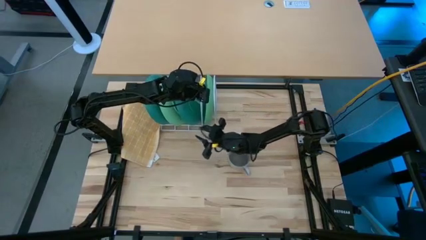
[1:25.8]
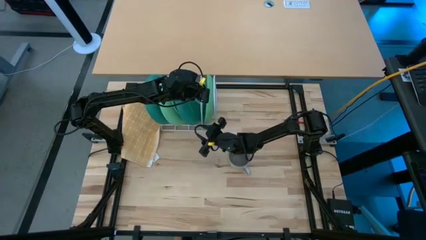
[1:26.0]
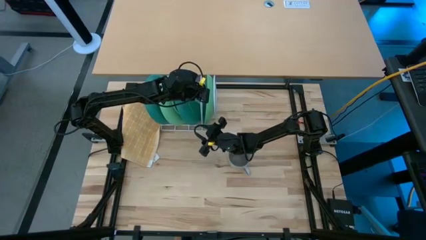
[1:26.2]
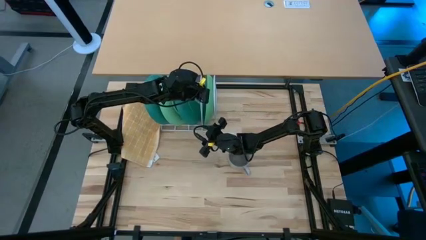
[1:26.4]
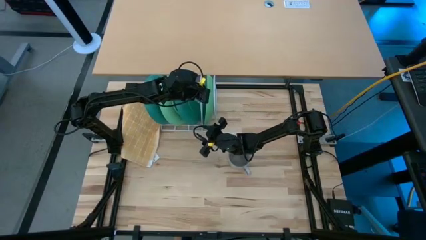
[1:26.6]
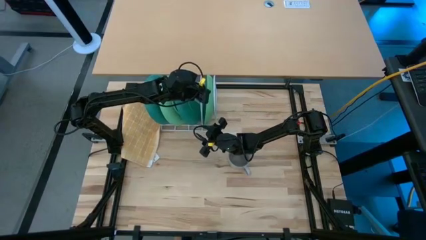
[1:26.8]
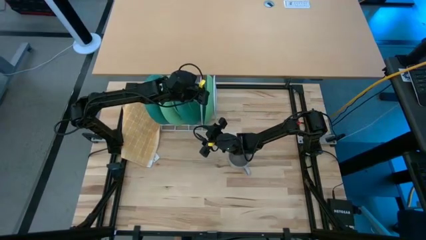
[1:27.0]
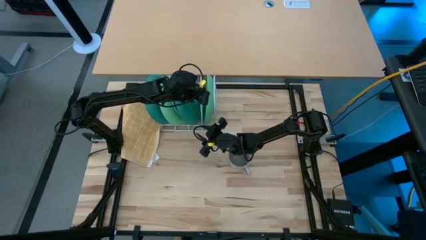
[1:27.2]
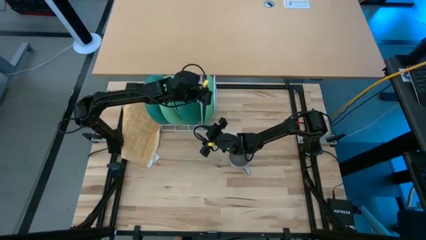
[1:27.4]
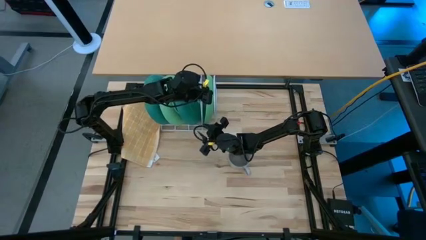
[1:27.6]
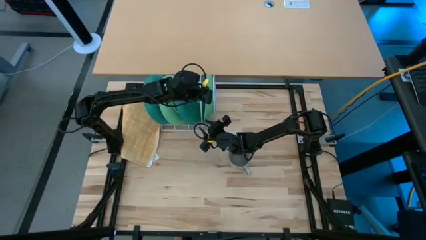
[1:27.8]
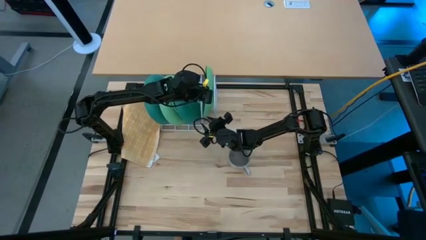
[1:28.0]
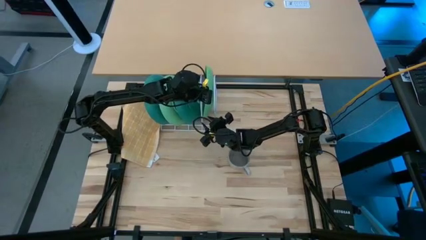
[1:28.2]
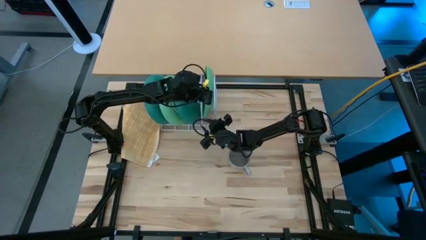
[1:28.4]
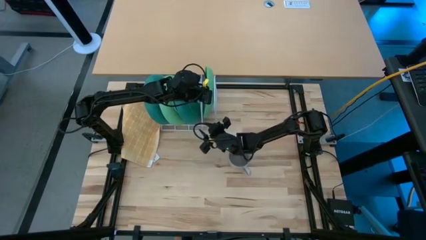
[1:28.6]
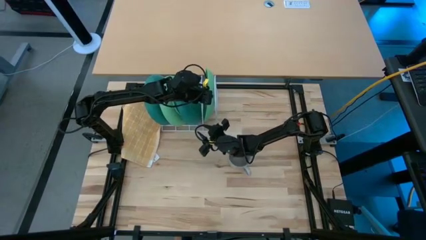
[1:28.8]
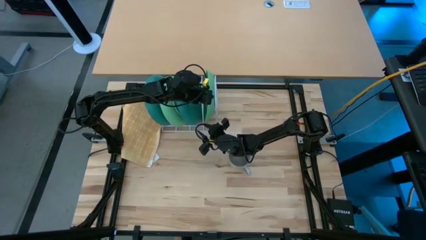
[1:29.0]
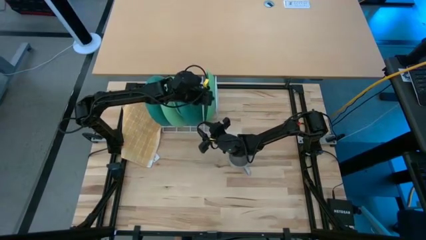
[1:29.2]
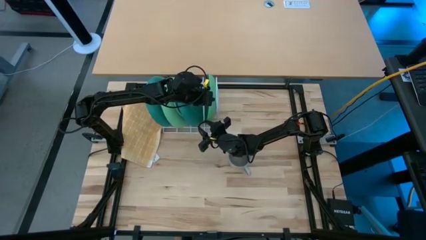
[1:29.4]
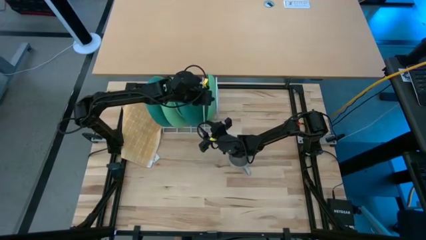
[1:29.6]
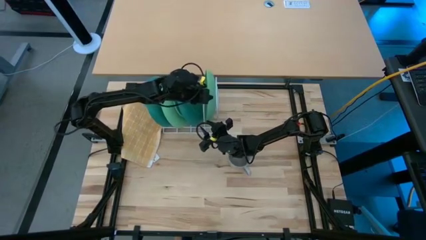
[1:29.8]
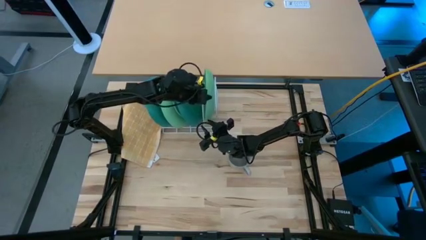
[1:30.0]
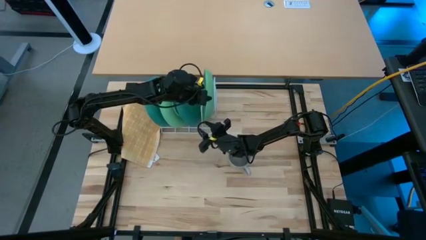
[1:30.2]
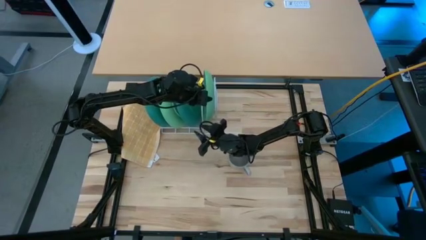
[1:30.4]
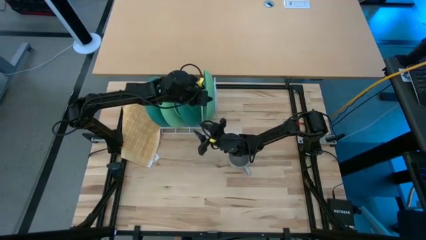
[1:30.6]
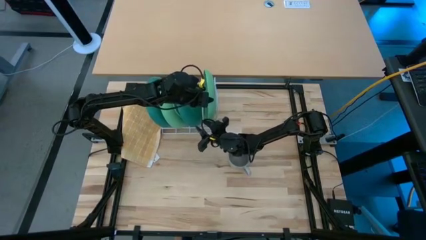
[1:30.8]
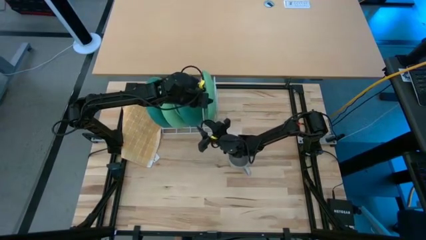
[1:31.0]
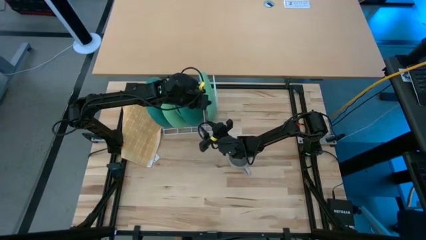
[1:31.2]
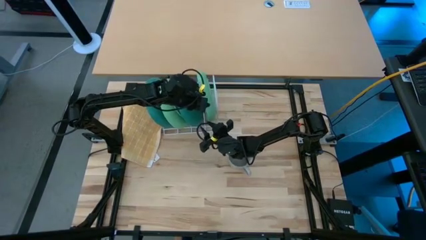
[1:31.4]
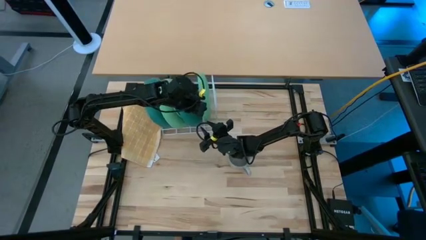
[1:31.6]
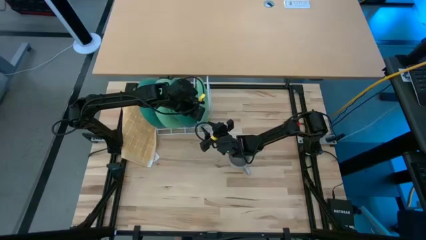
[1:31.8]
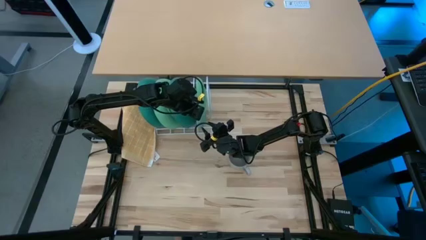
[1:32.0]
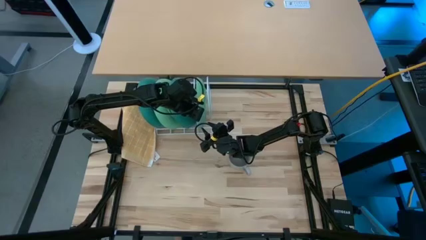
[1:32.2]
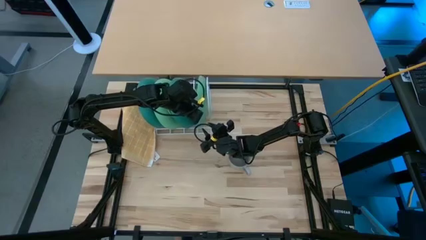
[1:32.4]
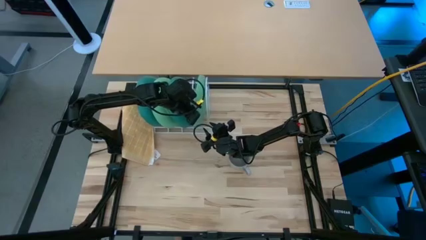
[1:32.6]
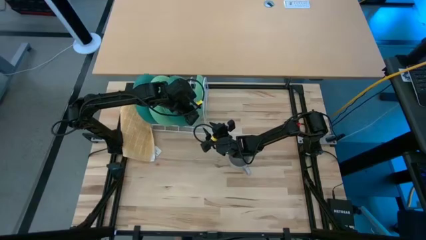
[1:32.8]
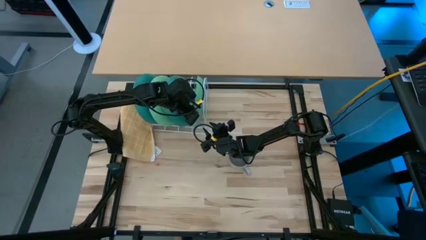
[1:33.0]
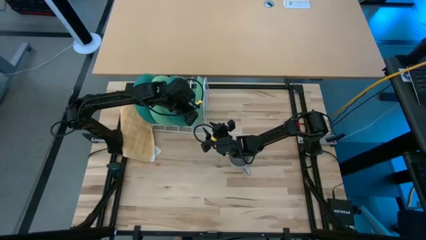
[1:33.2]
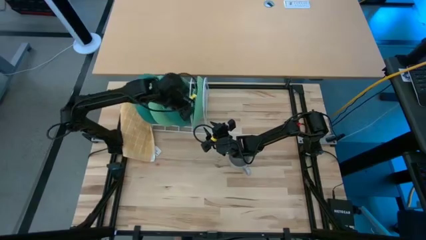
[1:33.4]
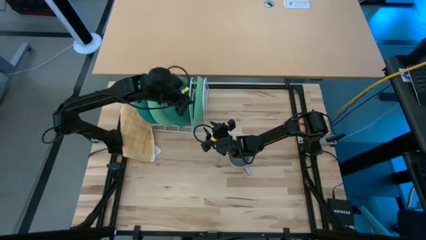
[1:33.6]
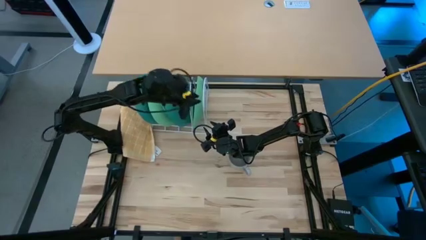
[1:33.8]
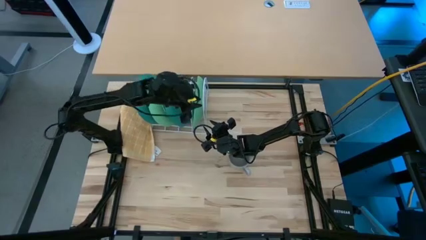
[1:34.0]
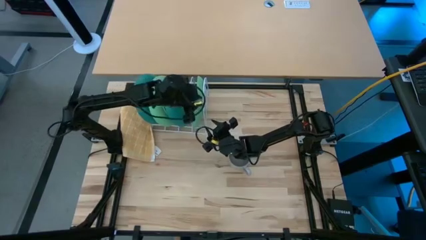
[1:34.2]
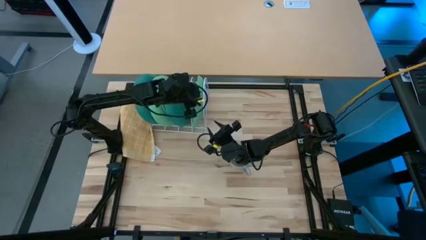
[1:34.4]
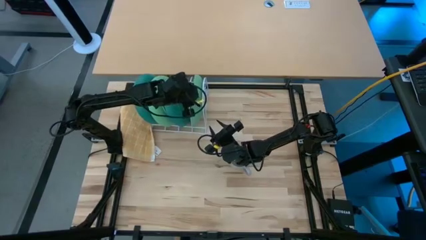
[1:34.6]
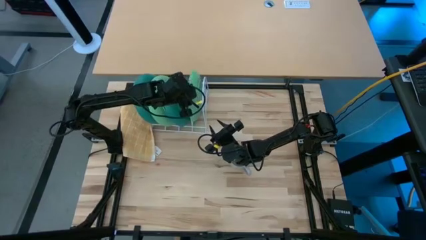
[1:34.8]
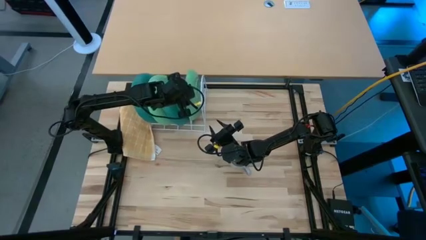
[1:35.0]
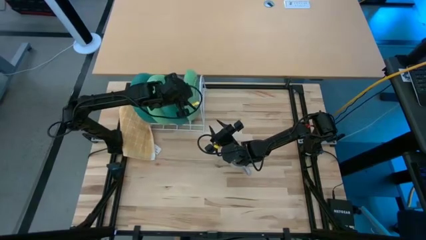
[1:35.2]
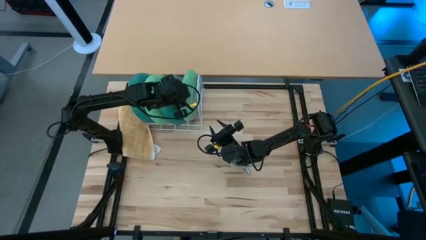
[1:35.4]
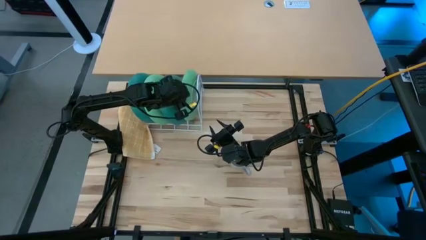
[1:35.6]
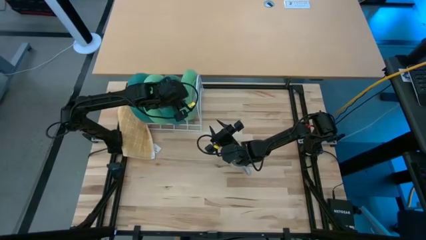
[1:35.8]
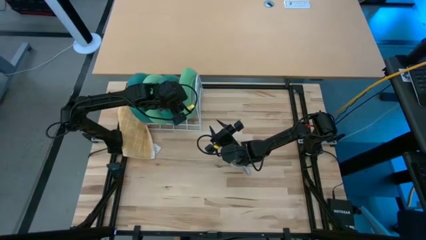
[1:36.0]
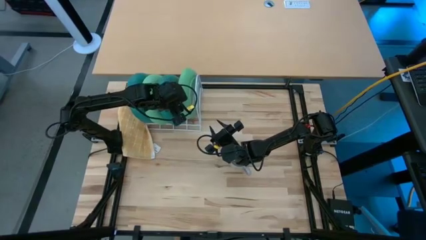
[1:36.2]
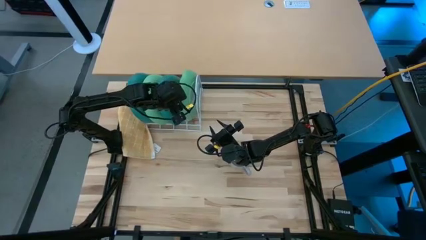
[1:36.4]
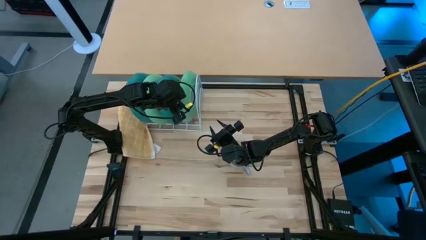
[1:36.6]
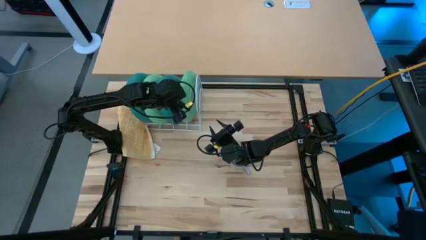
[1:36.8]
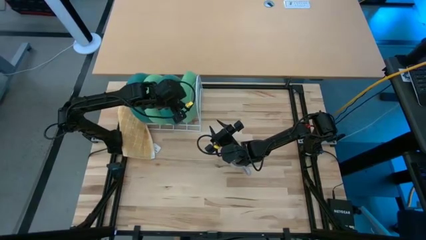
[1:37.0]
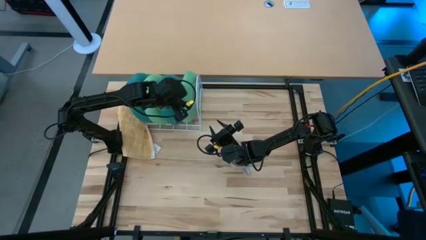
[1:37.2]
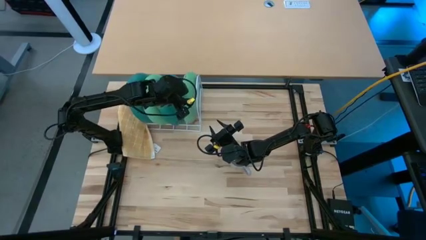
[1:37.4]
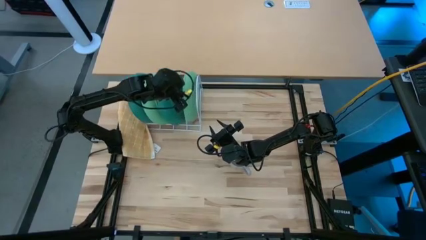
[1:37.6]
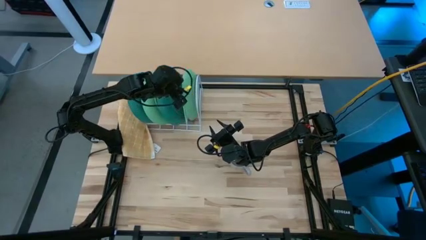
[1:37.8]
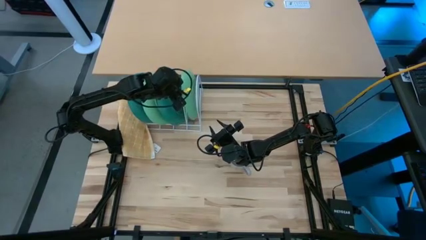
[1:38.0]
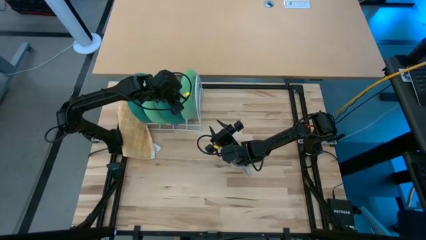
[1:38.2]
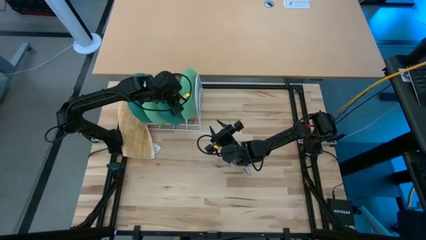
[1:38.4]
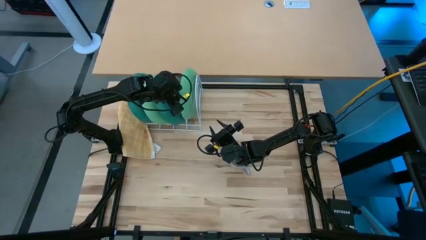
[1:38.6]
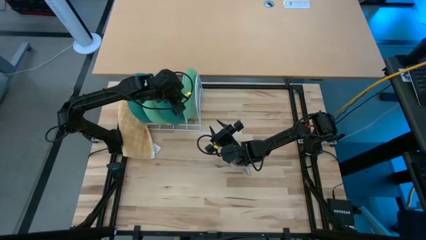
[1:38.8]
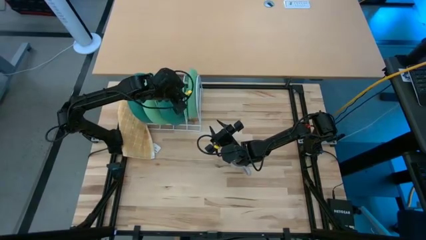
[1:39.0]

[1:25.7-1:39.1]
Task: Sort dishes
Put the green plate into the dish rack

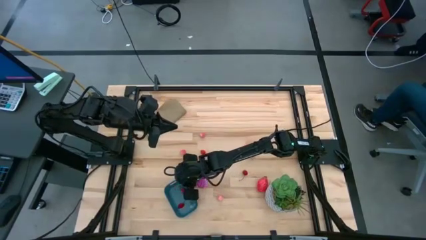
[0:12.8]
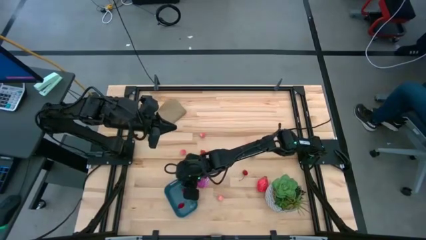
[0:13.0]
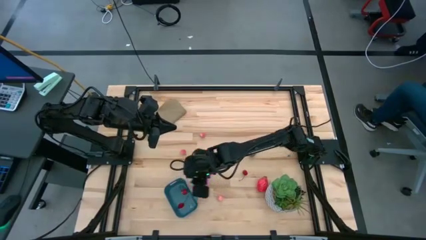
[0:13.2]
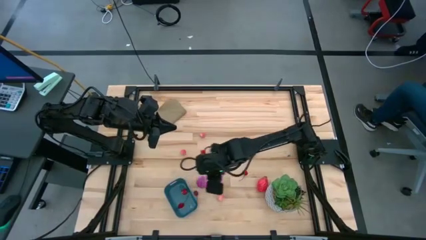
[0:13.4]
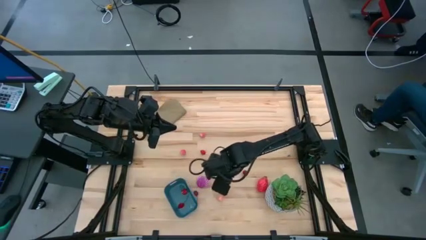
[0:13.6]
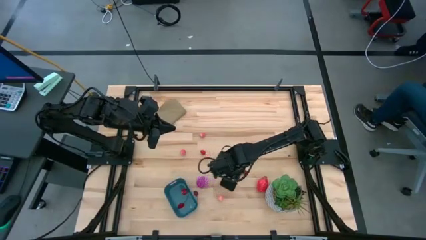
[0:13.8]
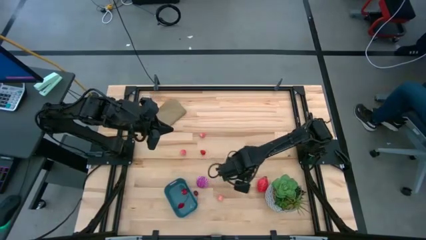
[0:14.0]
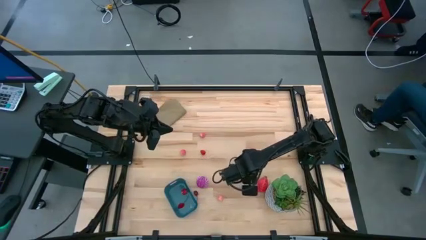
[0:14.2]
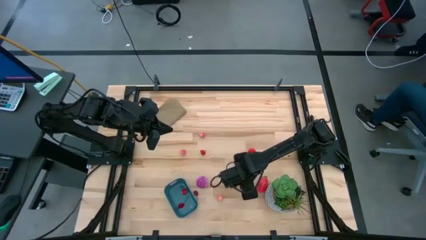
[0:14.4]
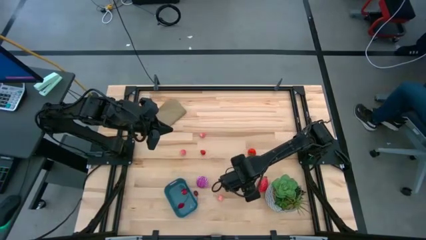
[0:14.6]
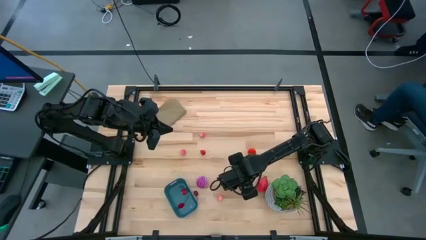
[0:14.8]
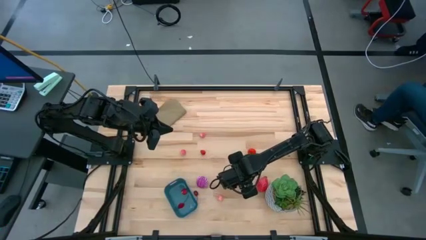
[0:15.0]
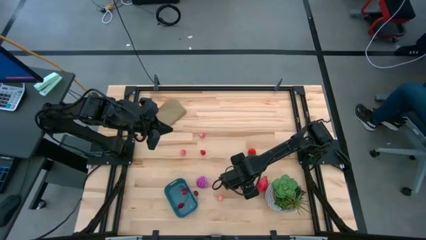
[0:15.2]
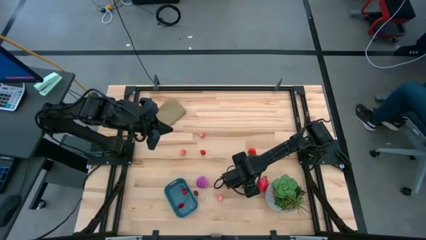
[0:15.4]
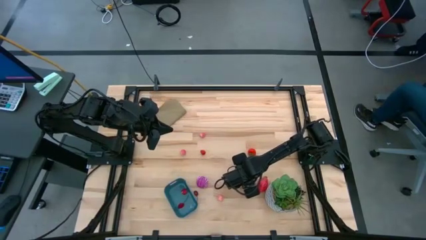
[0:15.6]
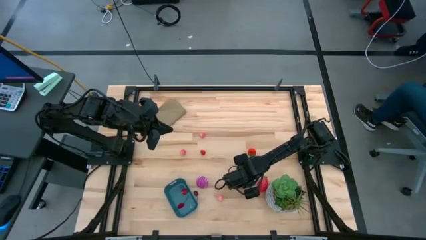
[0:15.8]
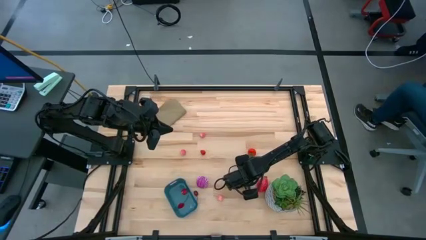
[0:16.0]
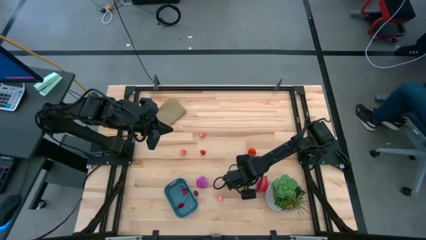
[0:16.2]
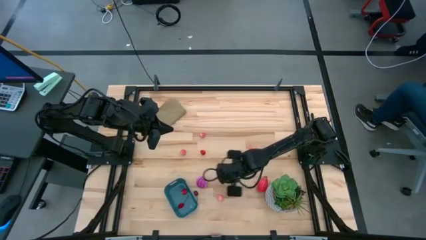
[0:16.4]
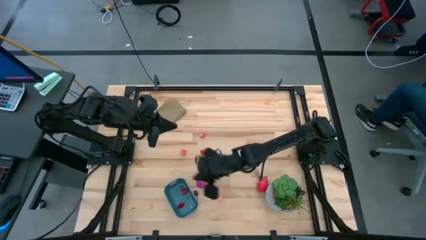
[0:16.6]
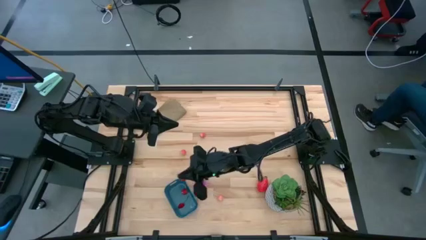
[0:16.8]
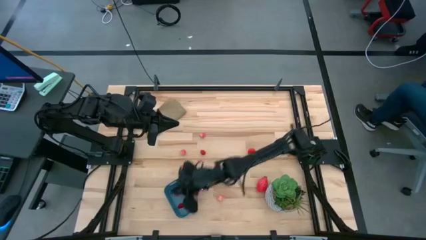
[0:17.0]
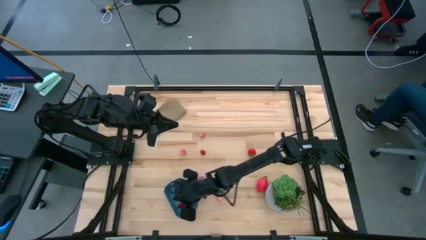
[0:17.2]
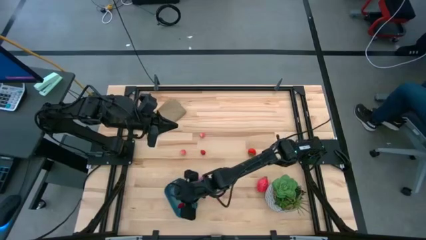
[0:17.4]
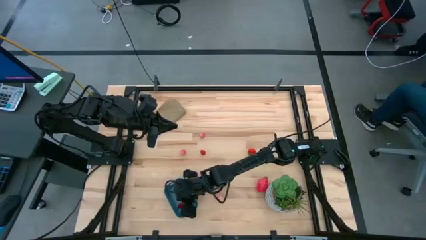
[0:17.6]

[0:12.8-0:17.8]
Task: Pick and placing Produce into tupperware
Put the red cherry into the blue bin
